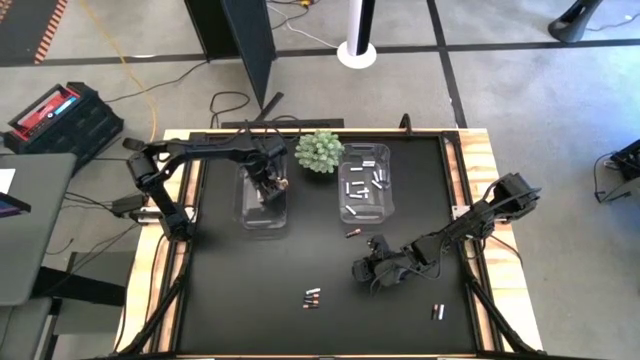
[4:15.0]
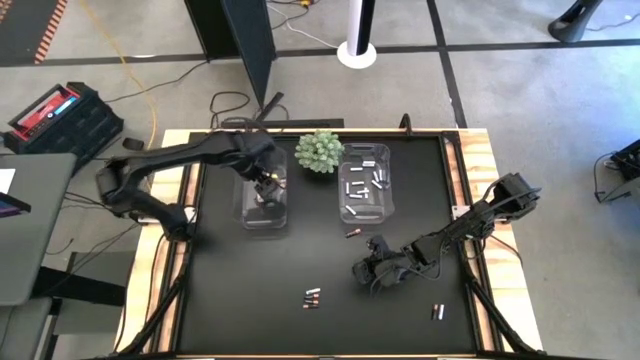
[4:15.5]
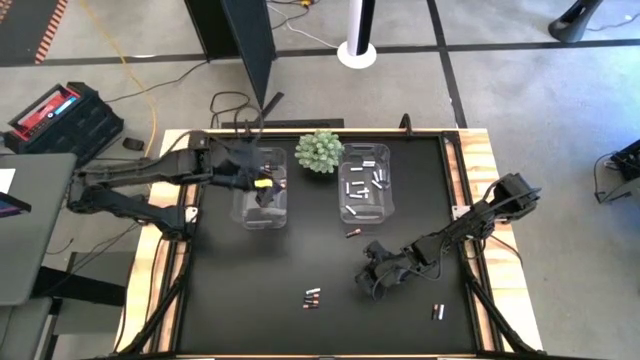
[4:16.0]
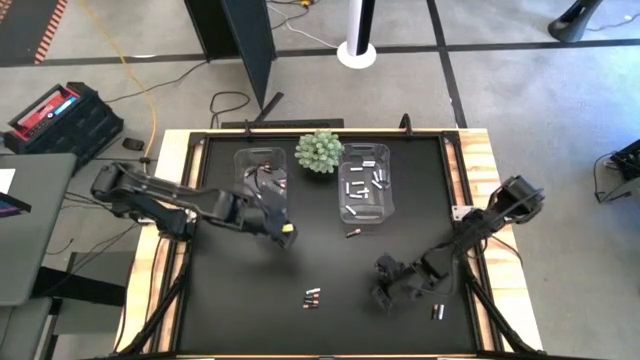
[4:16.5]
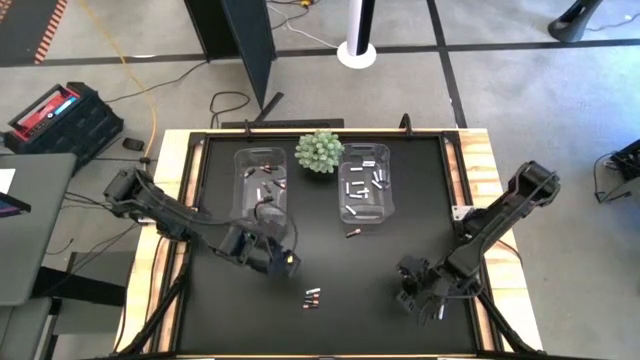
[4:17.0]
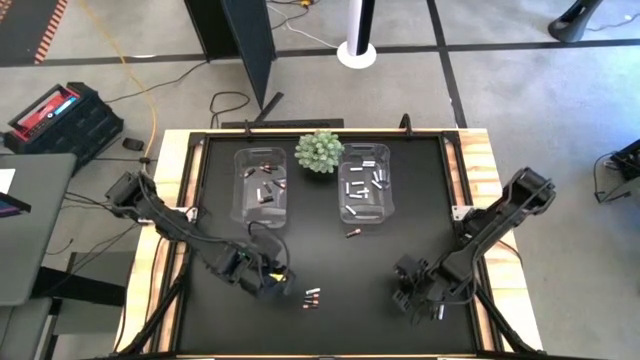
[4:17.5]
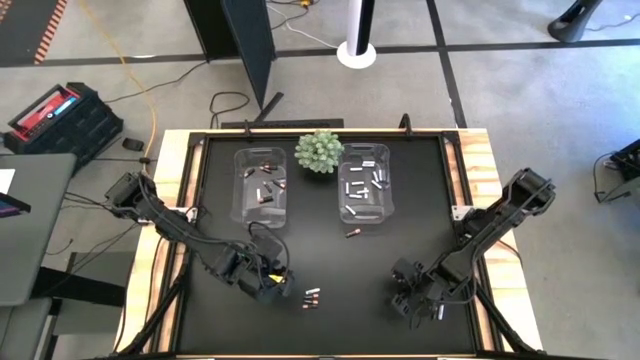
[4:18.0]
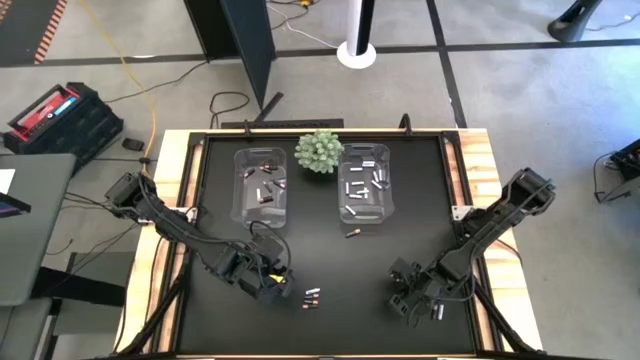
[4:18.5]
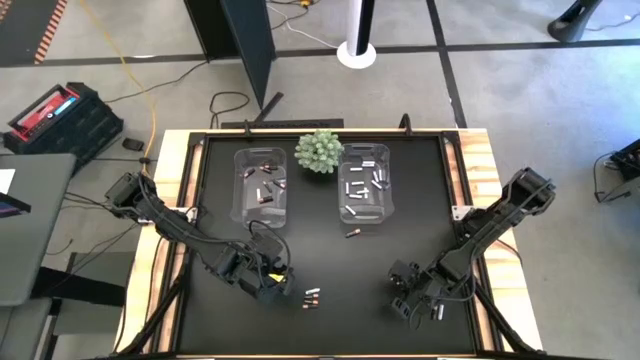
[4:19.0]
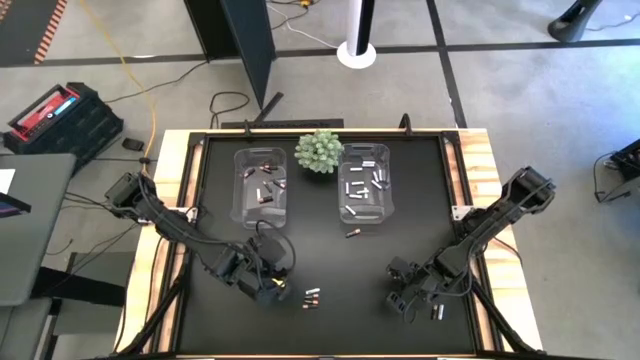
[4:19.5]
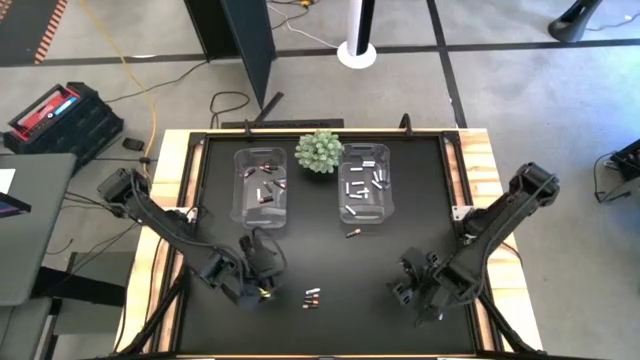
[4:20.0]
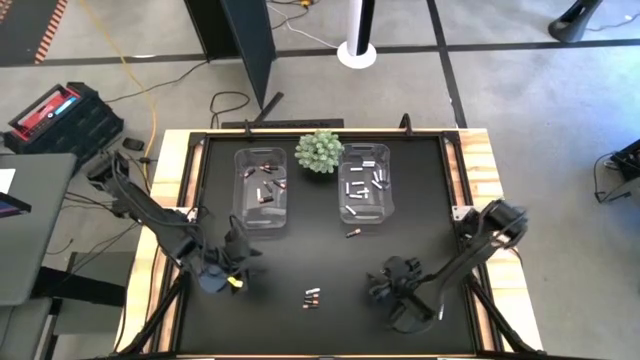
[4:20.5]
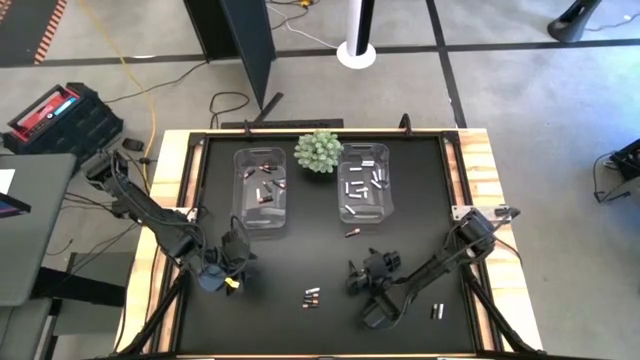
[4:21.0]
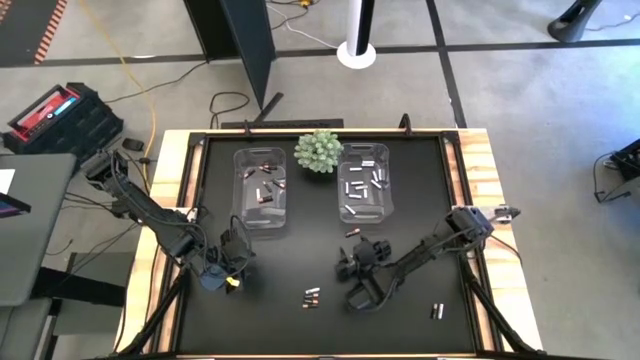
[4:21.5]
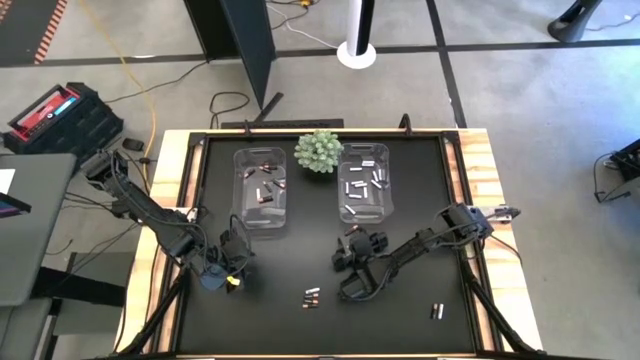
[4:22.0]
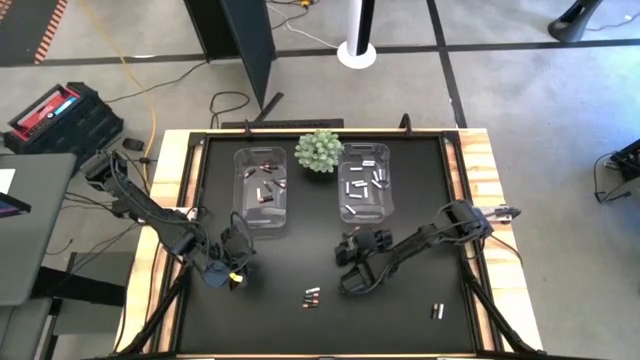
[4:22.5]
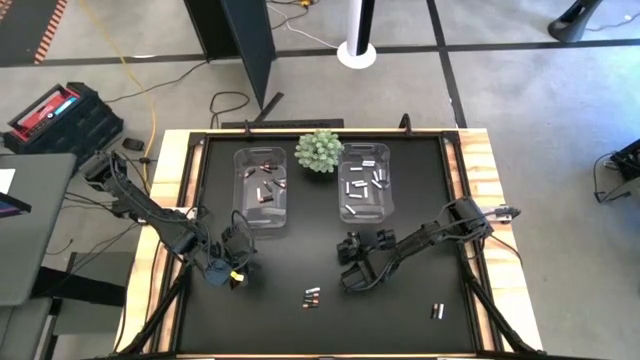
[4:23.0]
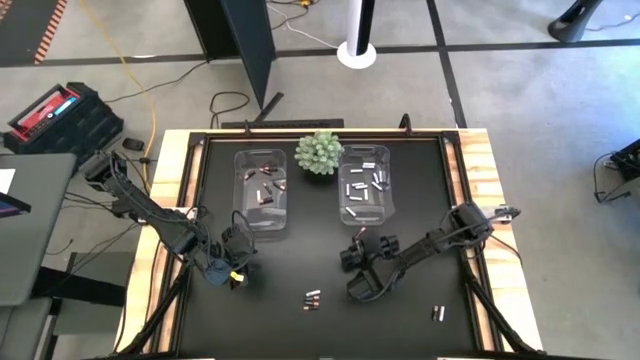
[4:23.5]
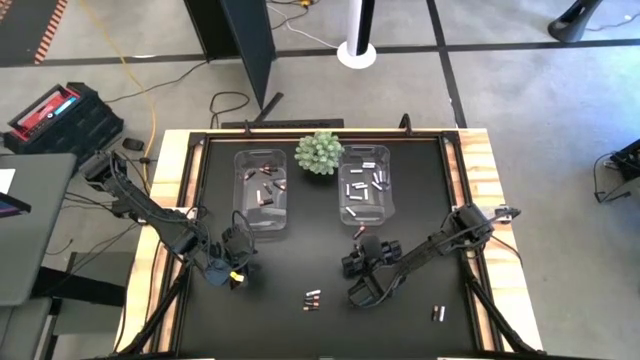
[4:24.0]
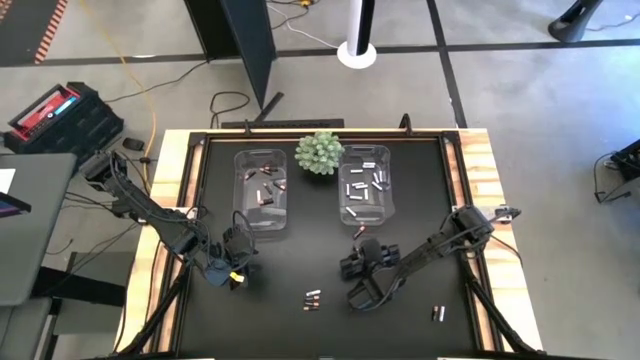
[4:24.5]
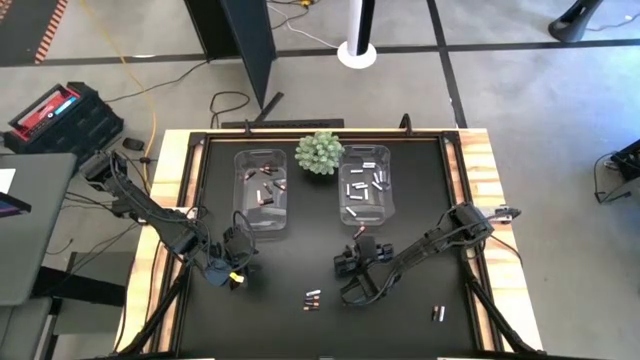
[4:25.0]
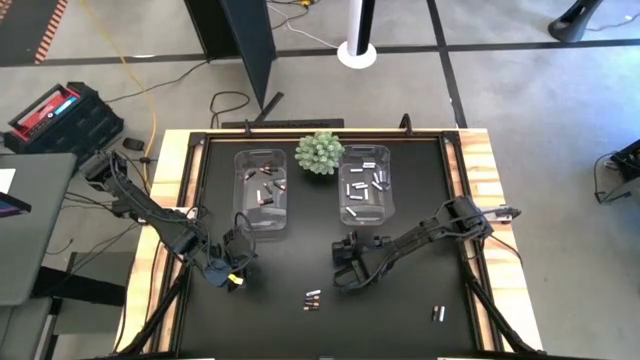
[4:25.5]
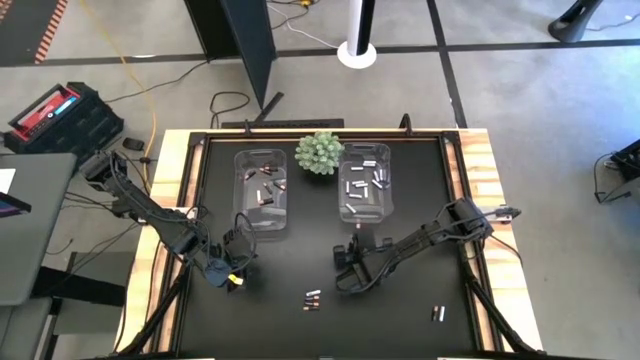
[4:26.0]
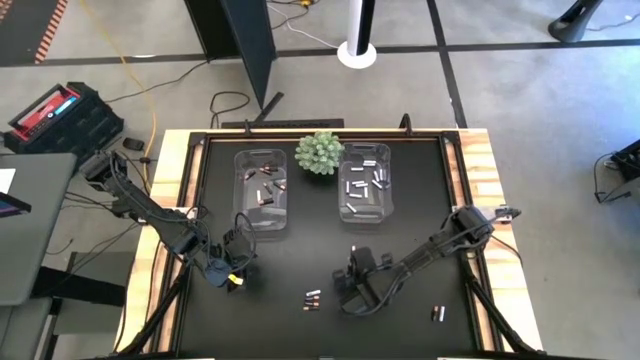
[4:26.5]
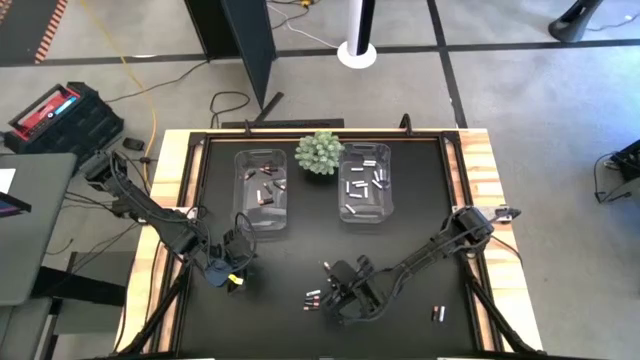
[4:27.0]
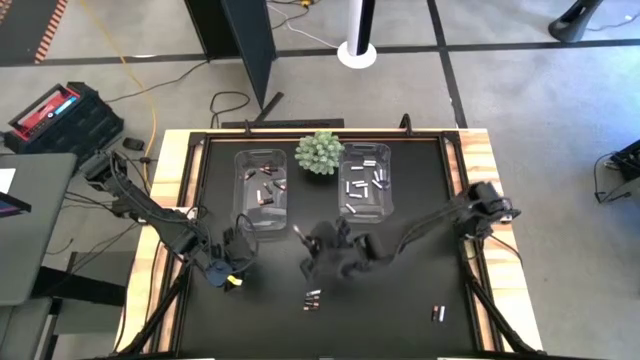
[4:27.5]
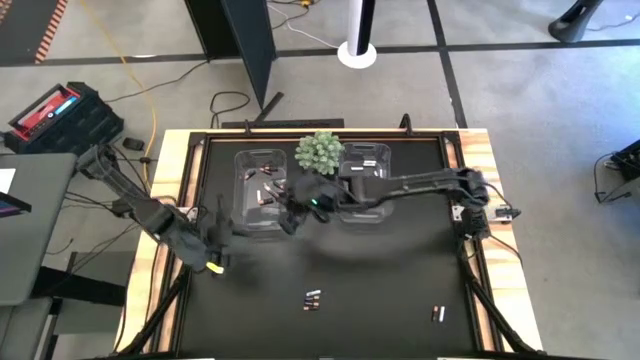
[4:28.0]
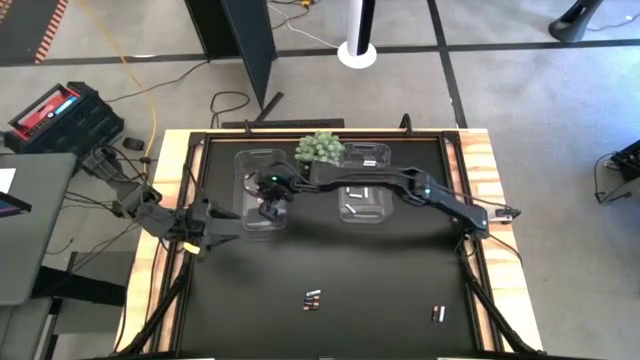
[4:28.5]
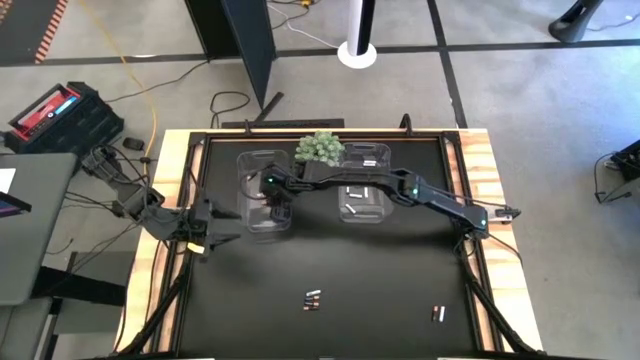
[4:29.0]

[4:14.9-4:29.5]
Task: Sort batteries
Put the black-brown battery into the left transparent bin

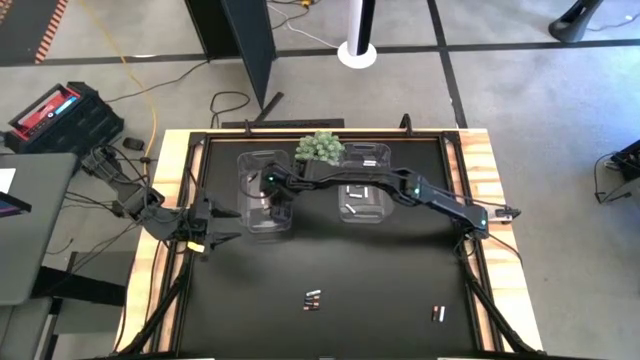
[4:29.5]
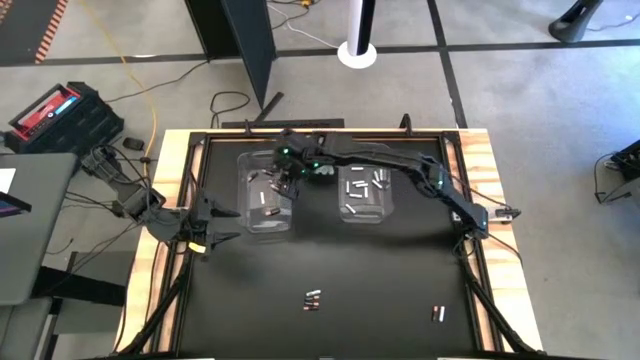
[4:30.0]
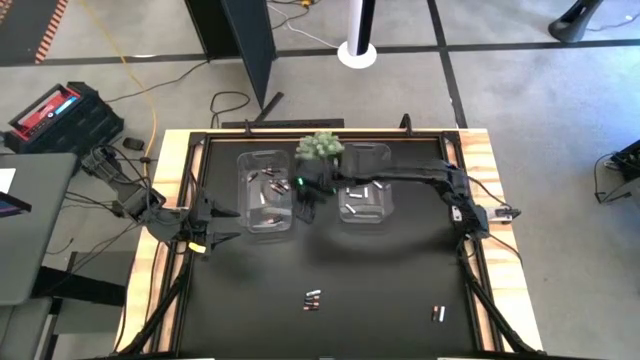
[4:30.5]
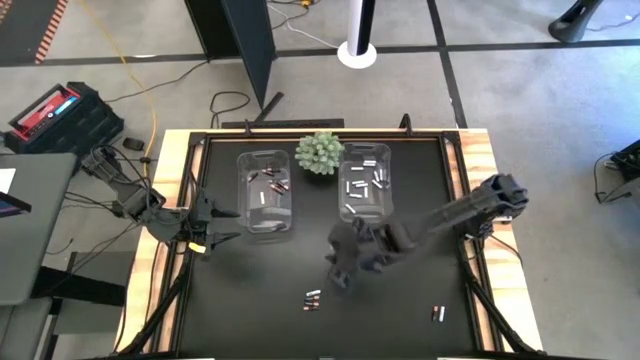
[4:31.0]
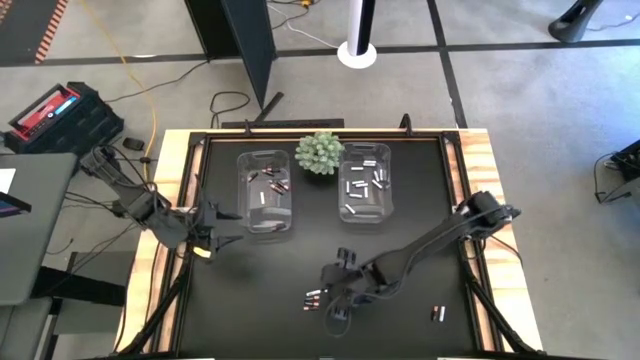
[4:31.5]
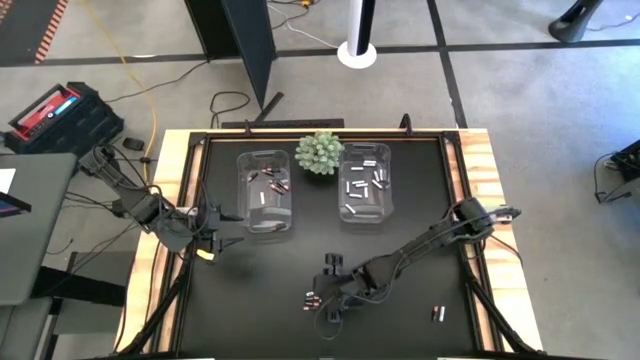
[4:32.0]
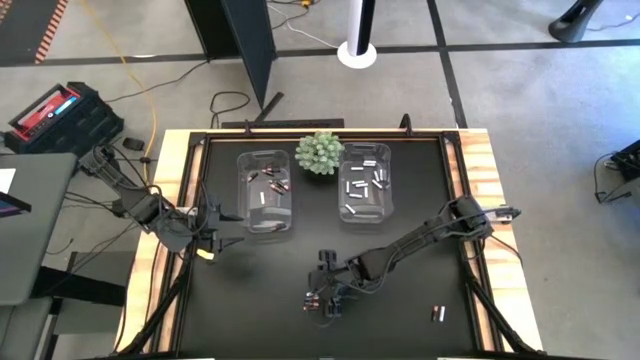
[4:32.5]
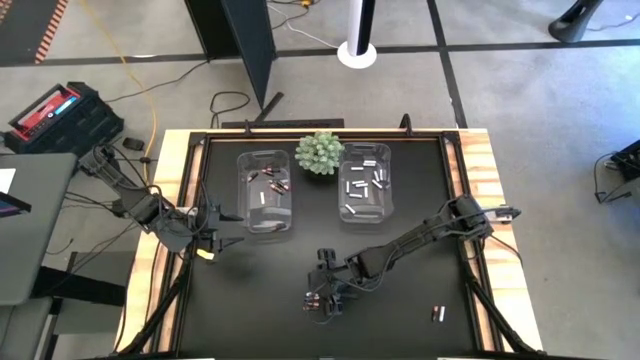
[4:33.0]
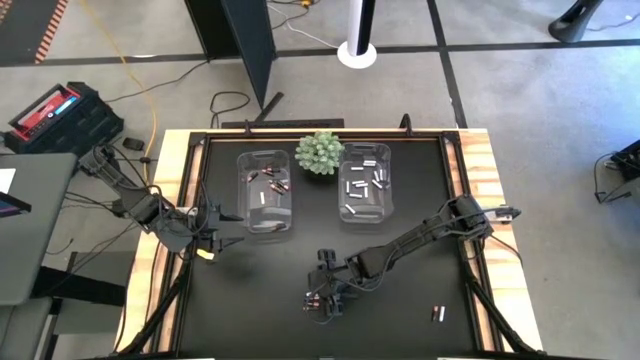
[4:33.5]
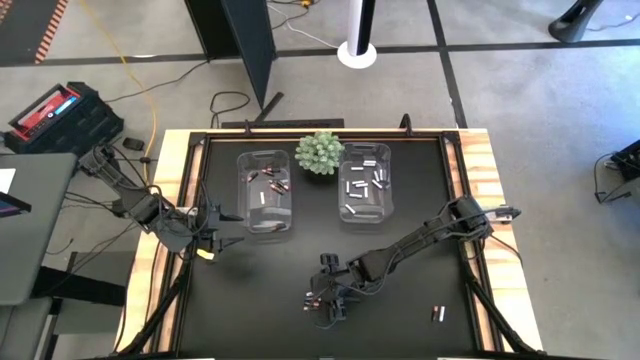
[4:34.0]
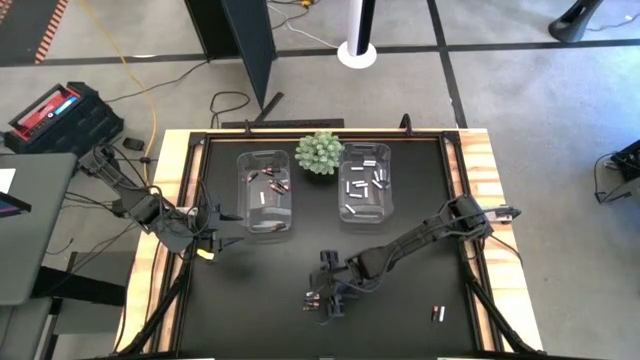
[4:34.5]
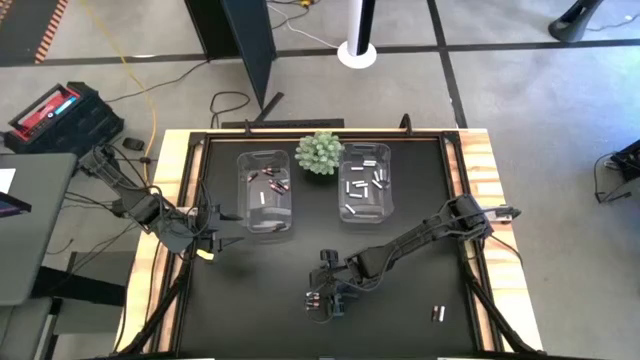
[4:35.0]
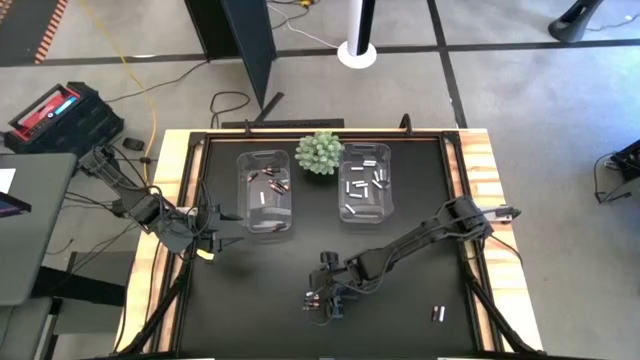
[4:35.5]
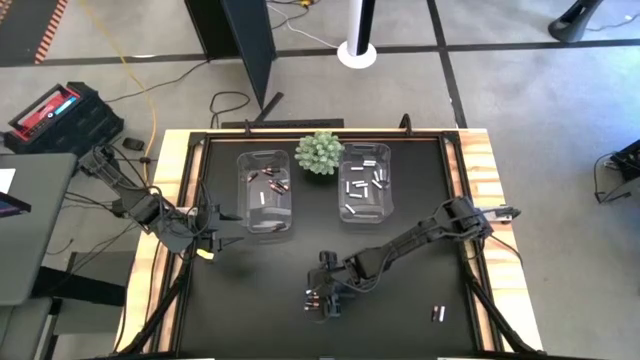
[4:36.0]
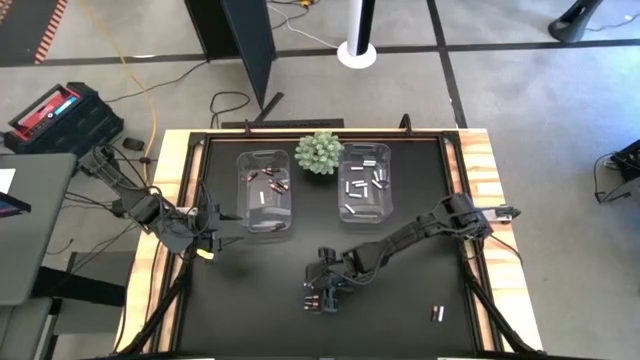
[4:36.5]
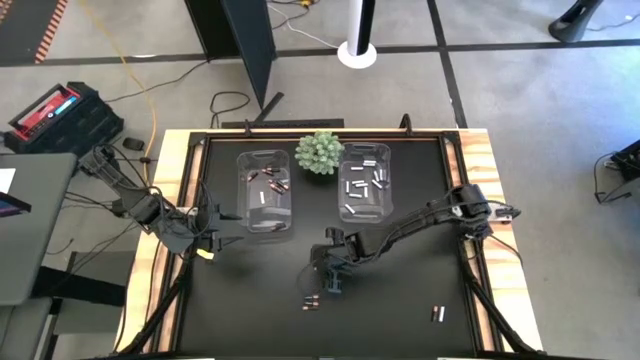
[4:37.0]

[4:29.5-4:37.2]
Put the white-blue battery into the right transparent bin
